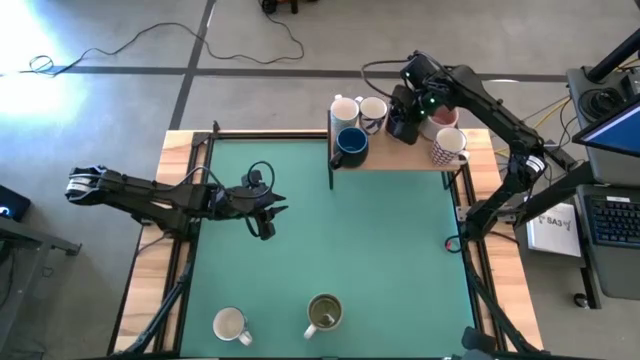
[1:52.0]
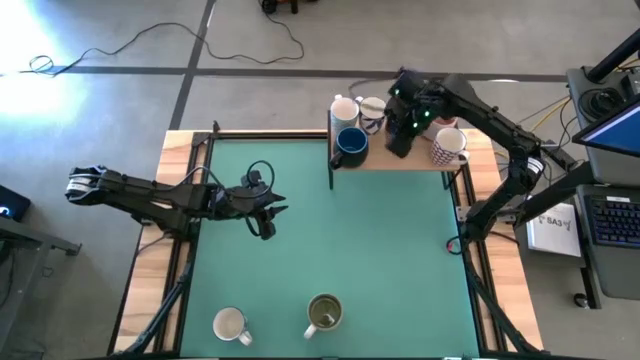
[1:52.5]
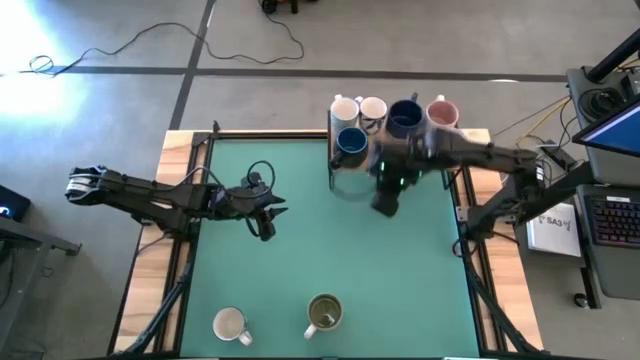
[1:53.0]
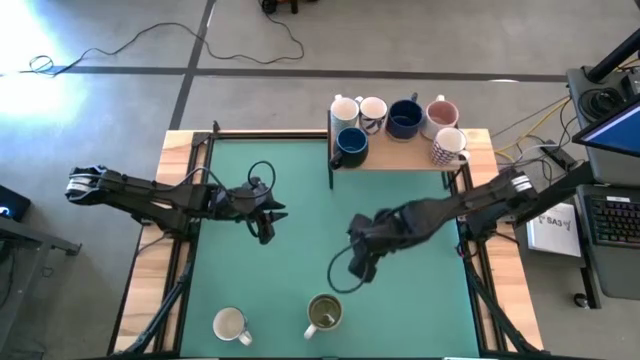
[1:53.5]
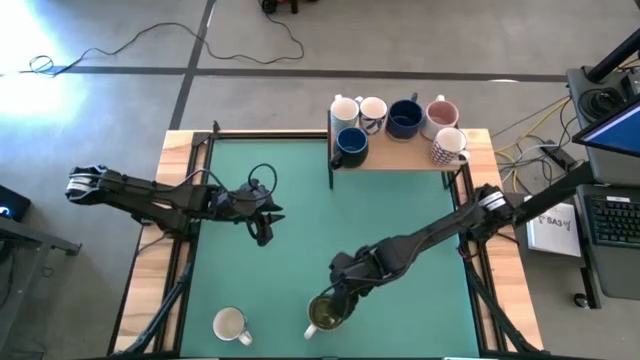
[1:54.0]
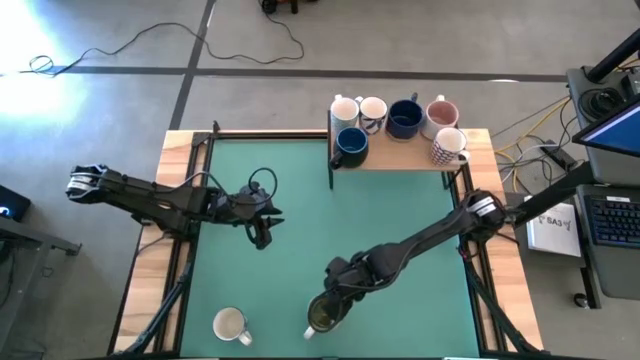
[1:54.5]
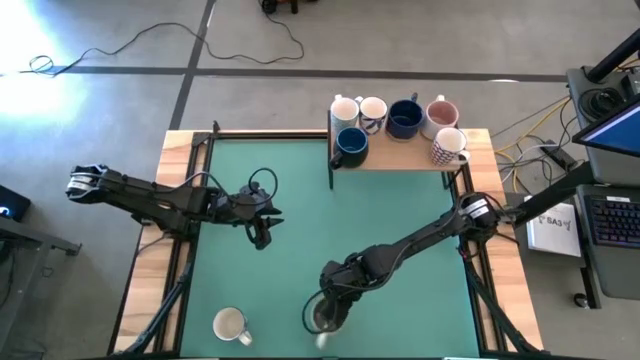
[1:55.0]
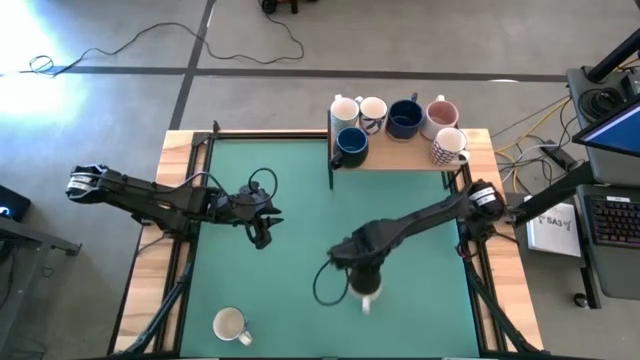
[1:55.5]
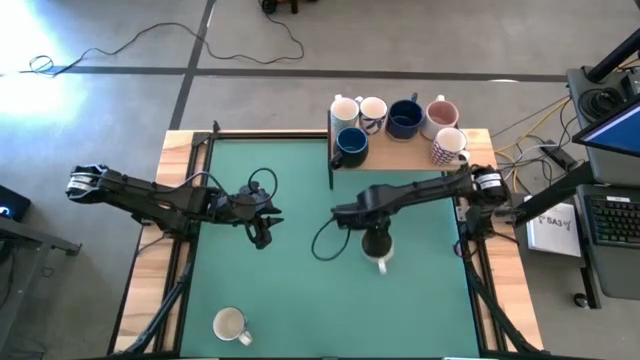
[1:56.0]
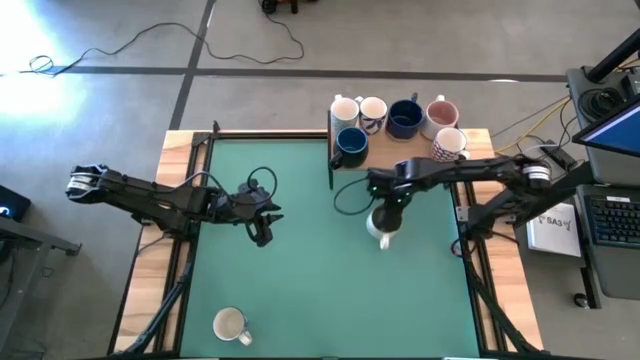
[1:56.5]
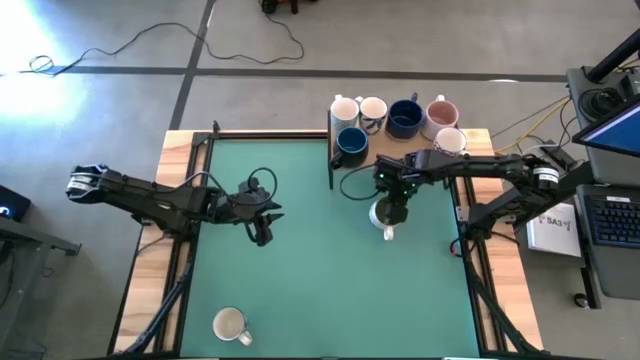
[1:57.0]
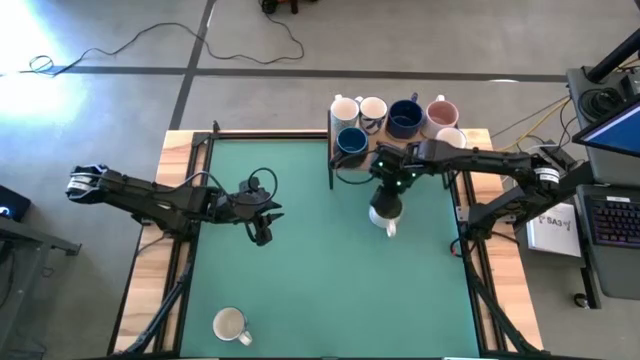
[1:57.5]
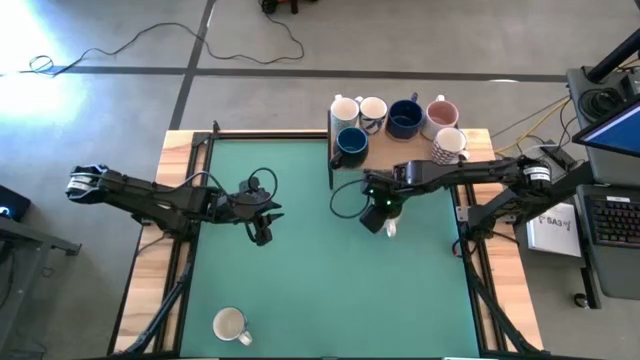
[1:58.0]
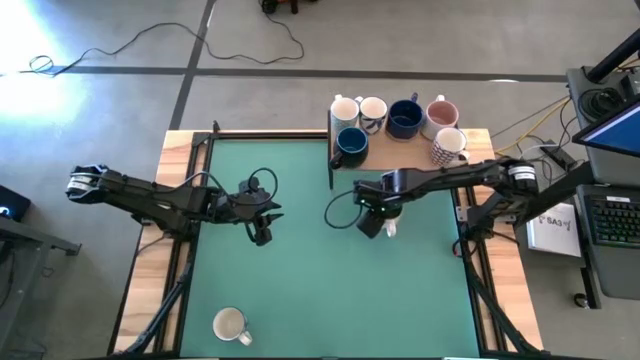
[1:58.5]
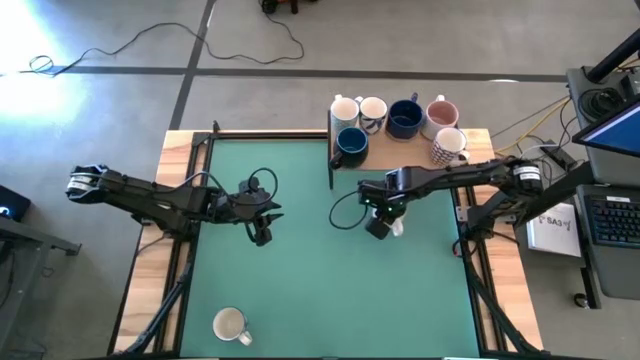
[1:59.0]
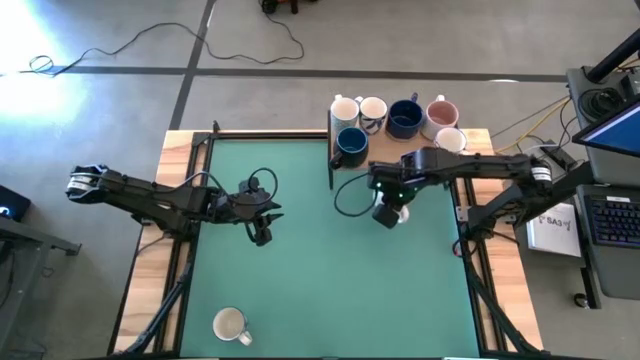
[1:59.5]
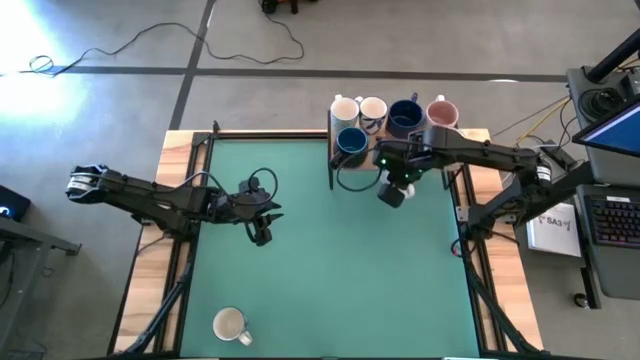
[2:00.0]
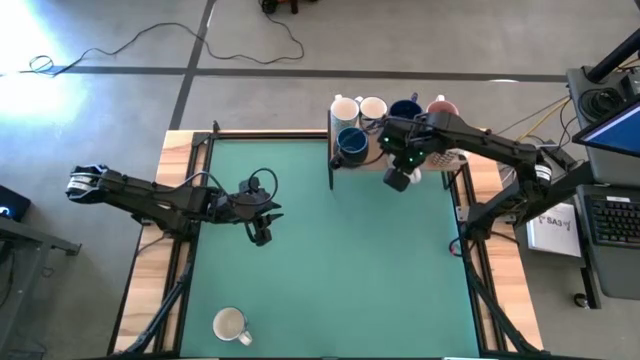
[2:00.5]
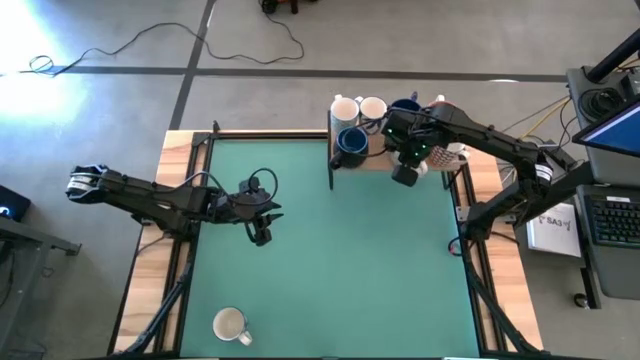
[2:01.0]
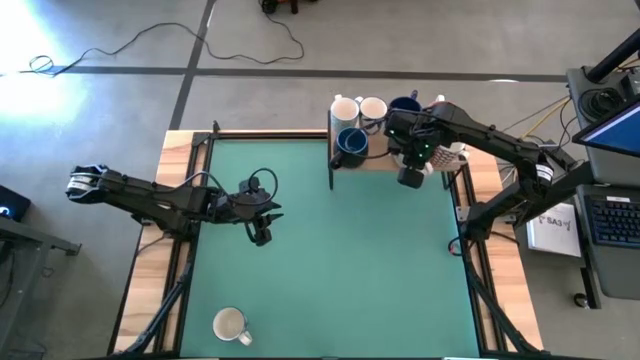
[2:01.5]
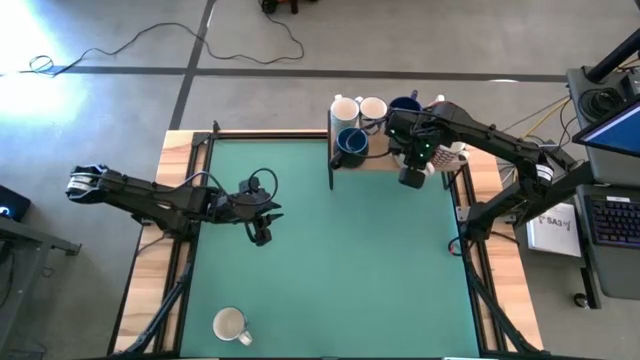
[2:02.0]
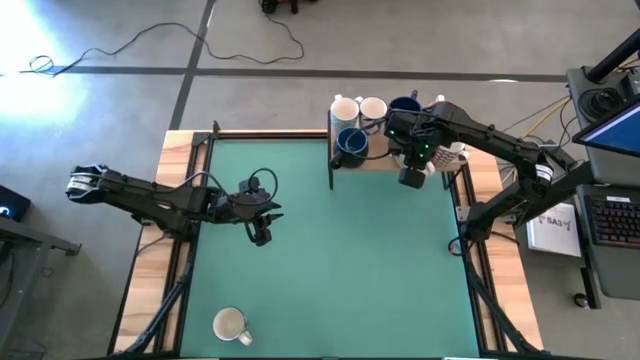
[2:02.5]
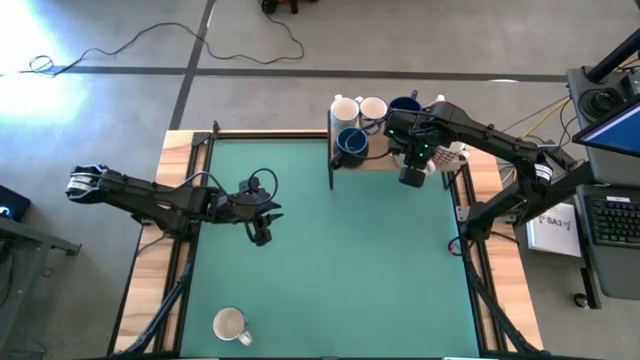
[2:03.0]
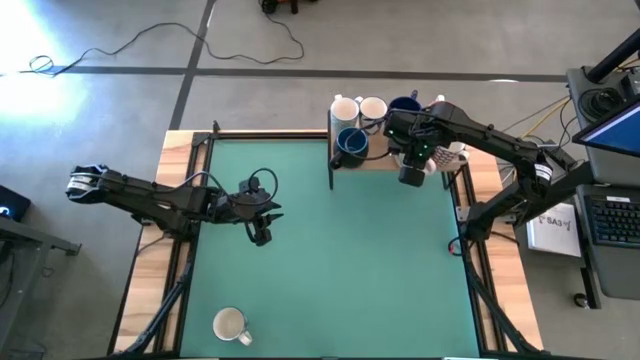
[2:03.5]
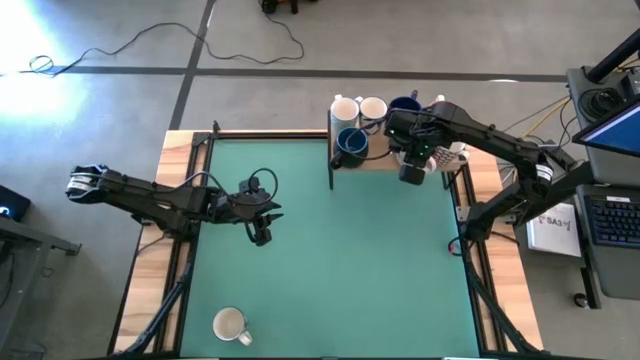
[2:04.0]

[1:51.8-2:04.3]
Task: Place coffee mugs
Put the white mug on the shelf

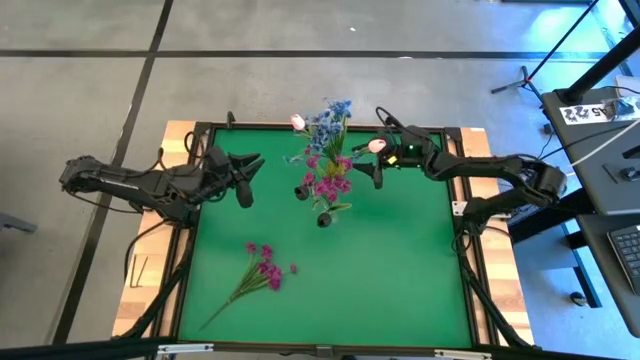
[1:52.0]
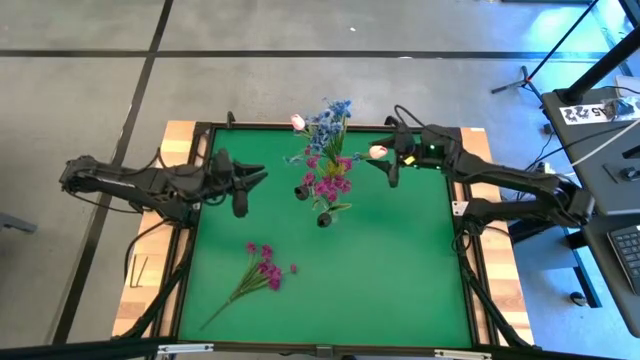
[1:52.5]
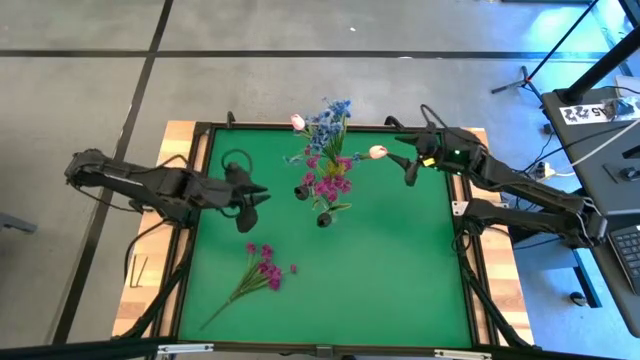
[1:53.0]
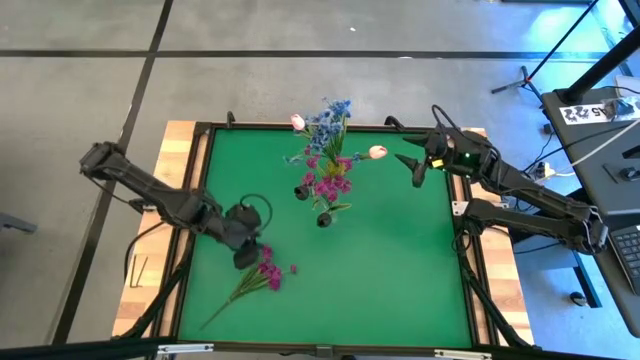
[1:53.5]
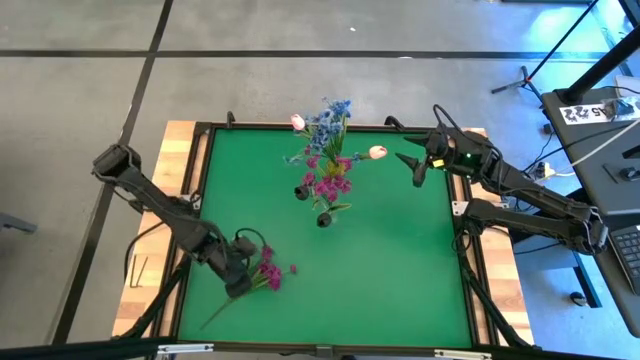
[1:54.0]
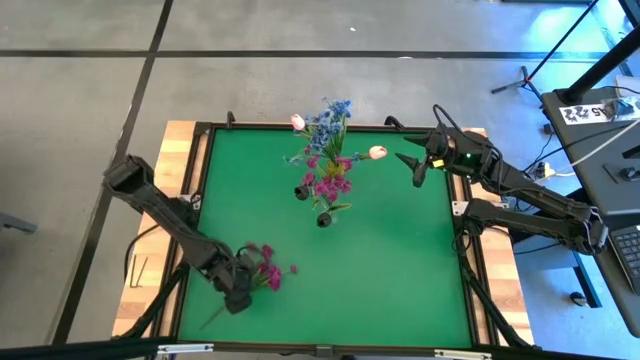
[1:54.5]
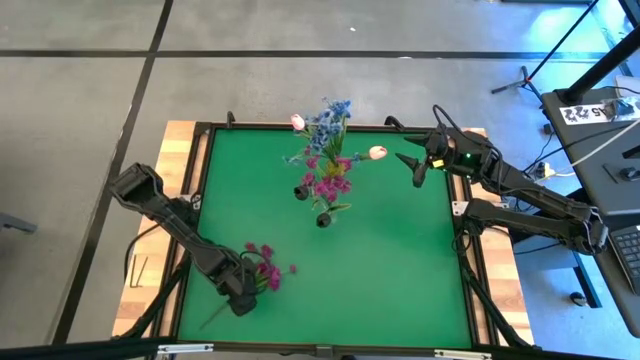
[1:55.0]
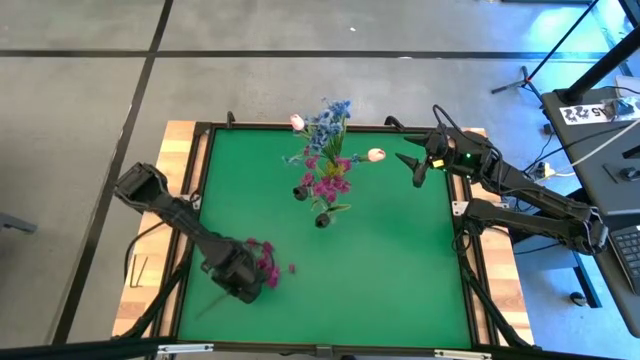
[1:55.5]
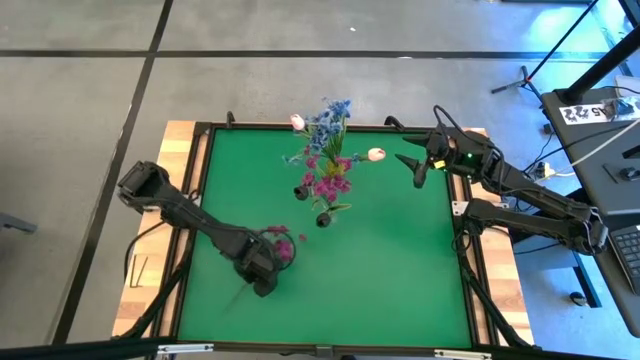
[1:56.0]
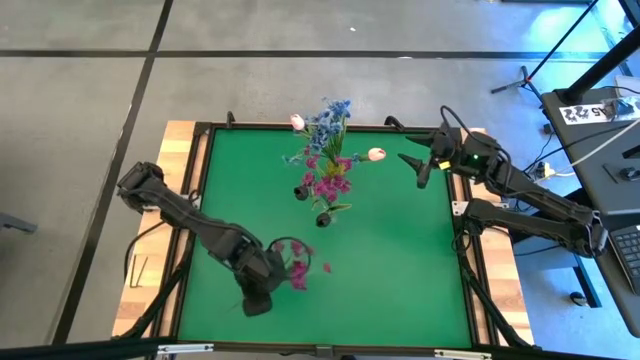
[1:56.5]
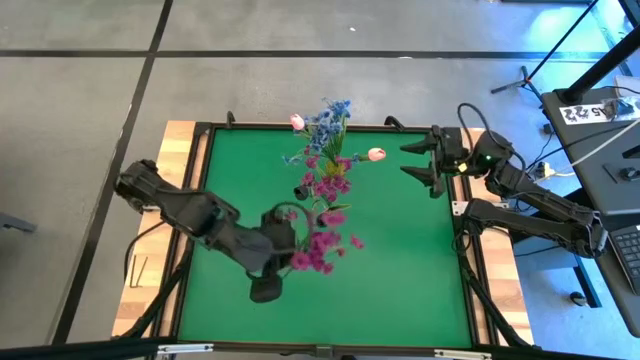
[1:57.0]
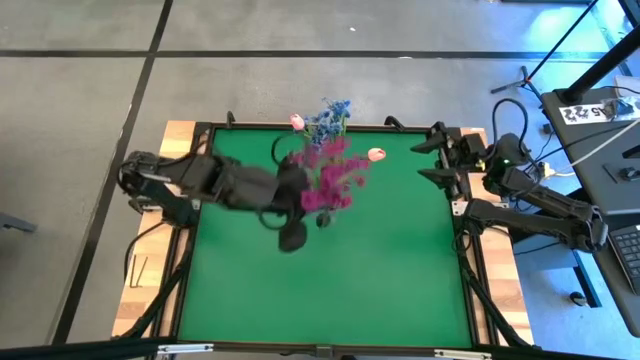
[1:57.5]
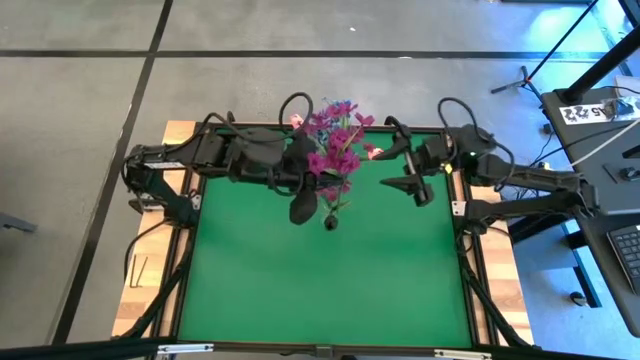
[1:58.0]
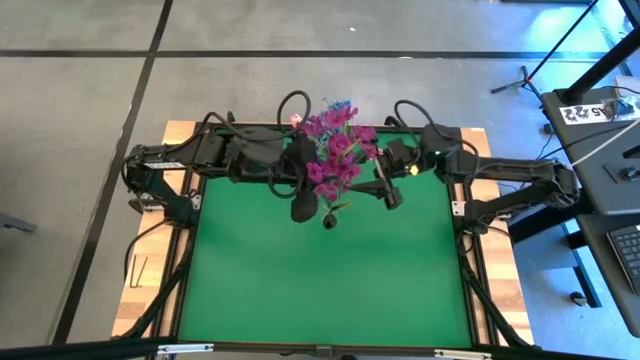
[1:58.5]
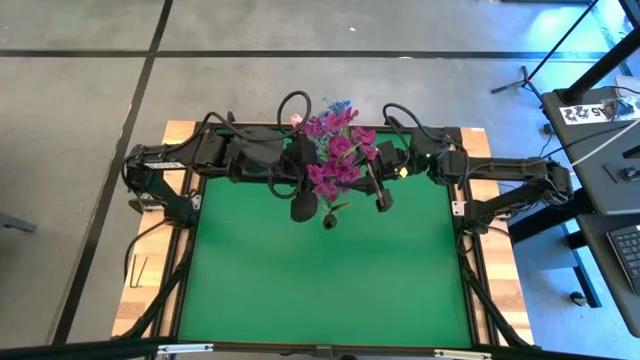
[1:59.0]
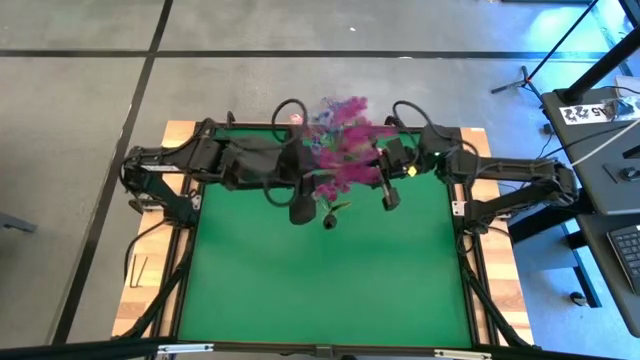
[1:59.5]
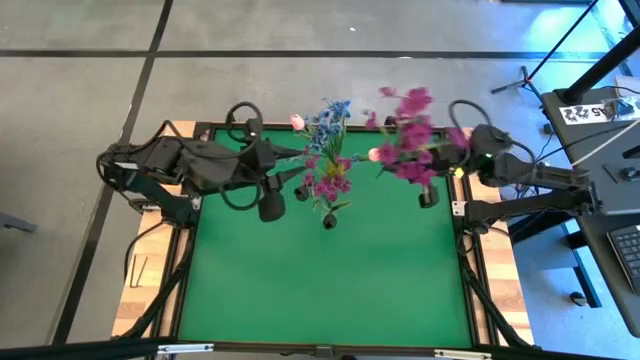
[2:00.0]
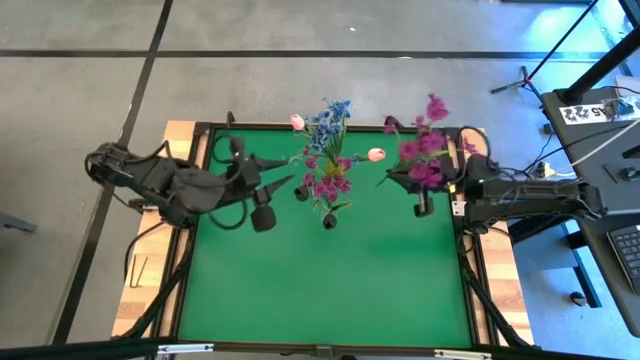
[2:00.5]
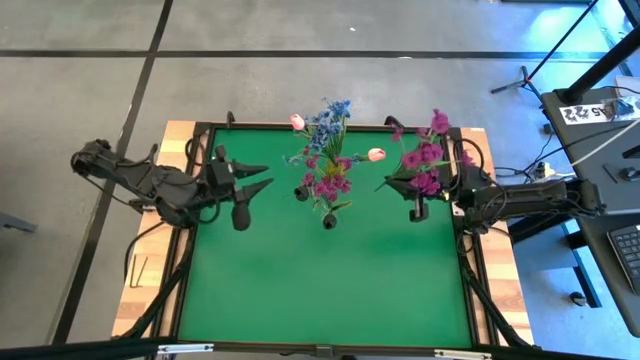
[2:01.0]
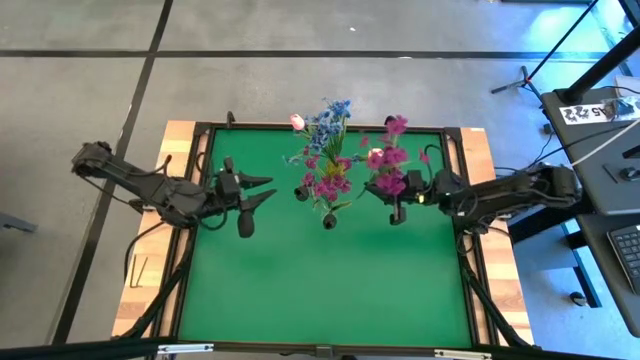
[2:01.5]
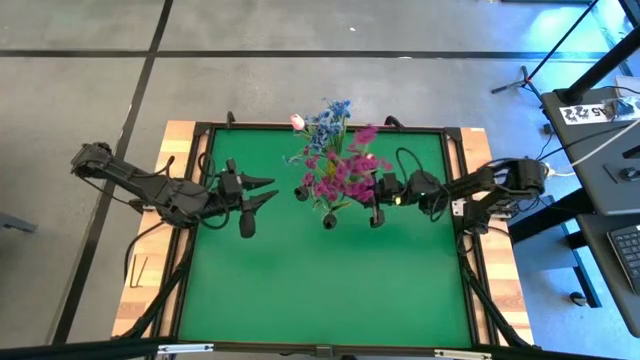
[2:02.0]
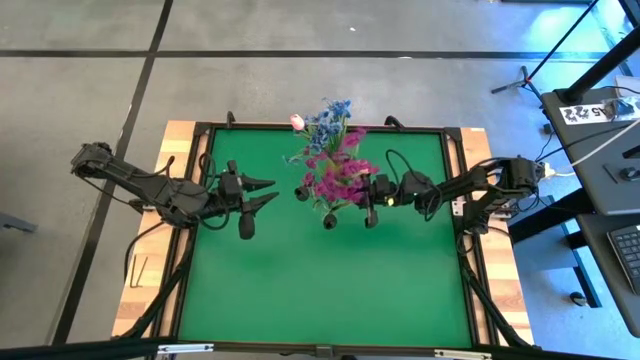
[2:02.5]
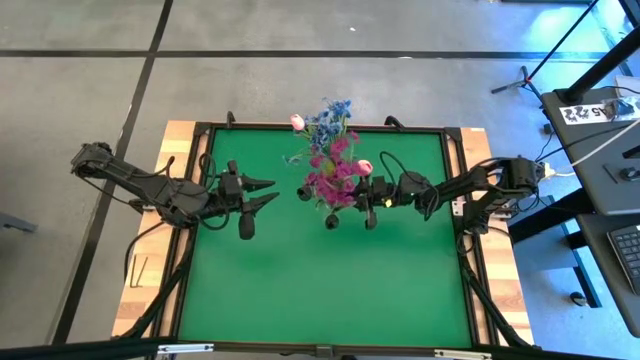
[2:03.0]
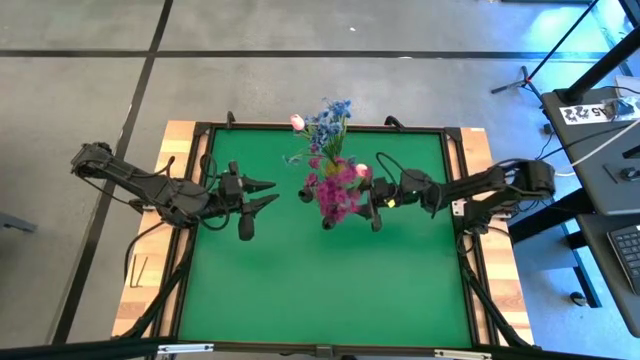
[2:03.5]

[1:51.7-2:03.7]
Task: Sort flowers into vase by color
Put the violet flowers into the transparent vase
